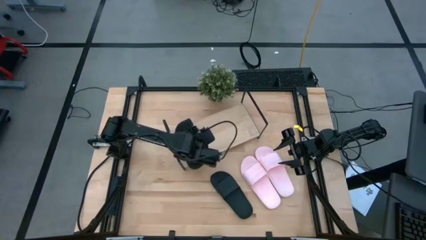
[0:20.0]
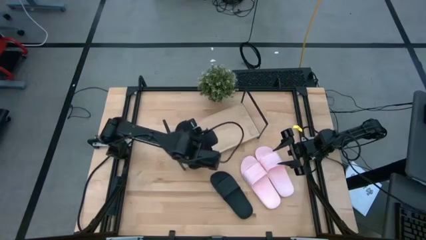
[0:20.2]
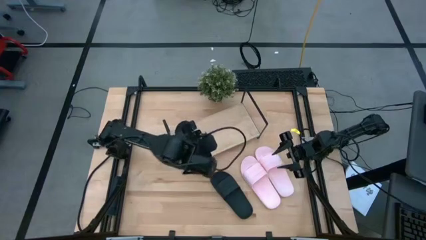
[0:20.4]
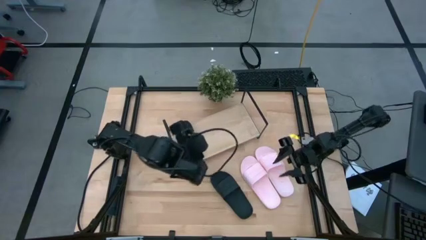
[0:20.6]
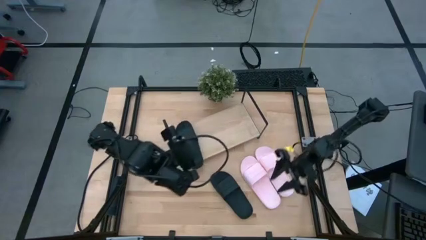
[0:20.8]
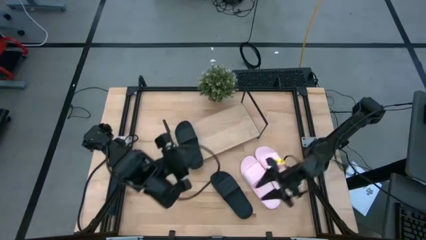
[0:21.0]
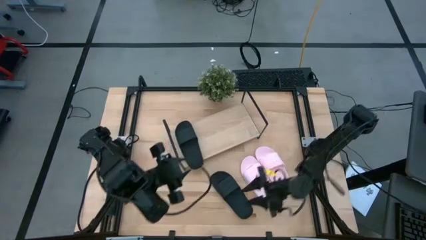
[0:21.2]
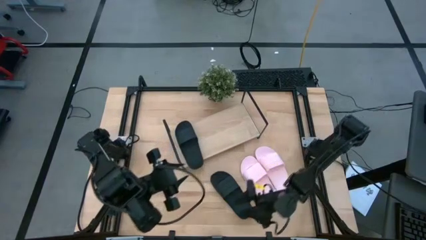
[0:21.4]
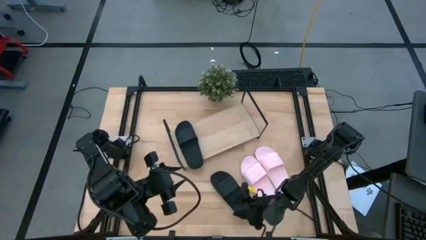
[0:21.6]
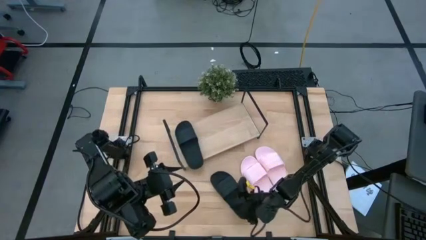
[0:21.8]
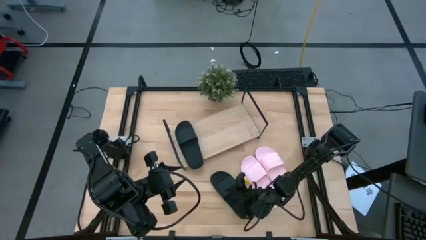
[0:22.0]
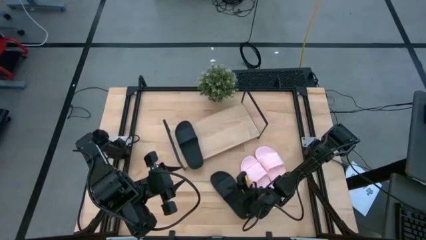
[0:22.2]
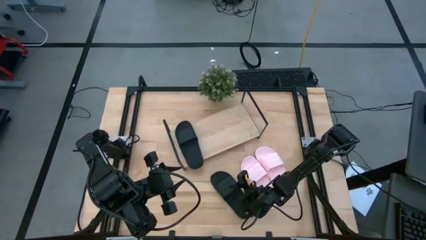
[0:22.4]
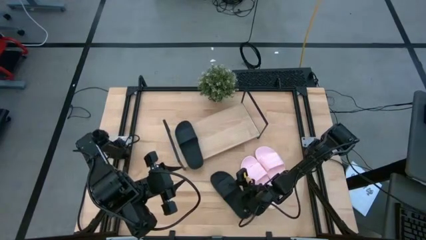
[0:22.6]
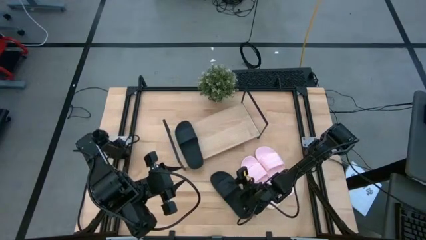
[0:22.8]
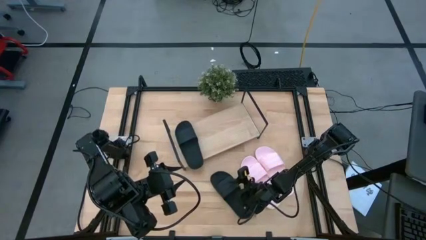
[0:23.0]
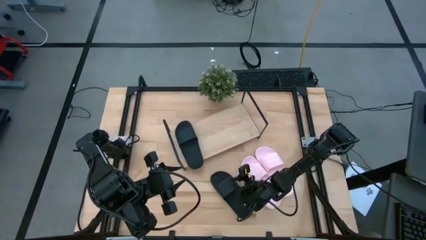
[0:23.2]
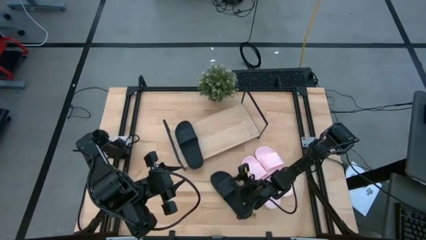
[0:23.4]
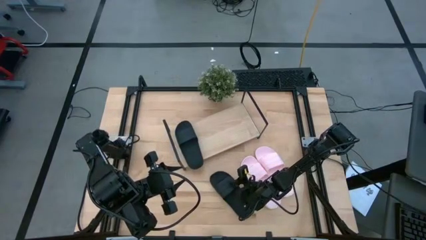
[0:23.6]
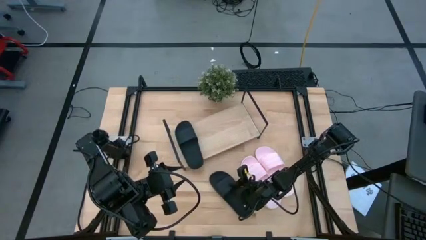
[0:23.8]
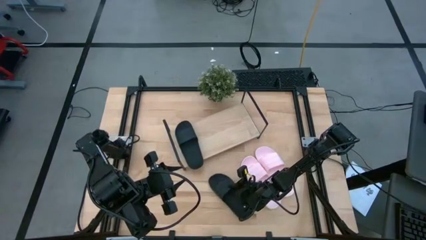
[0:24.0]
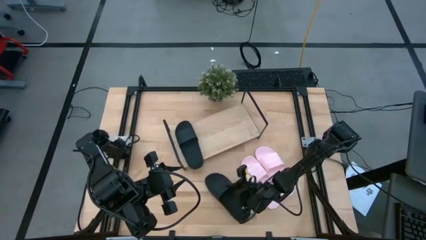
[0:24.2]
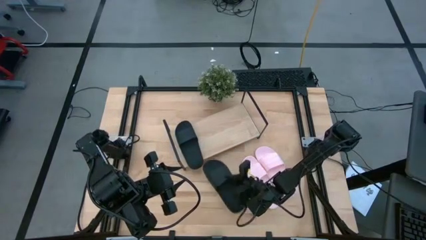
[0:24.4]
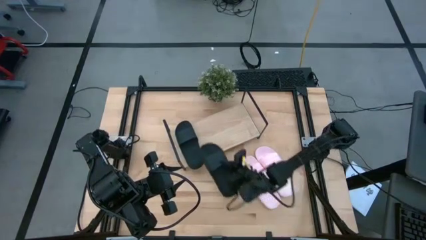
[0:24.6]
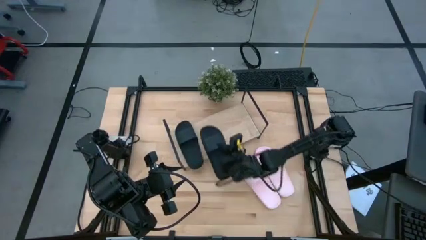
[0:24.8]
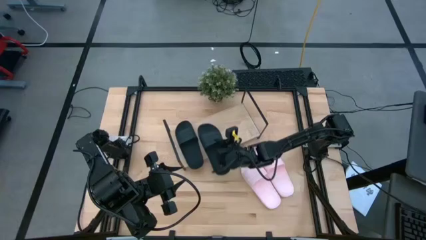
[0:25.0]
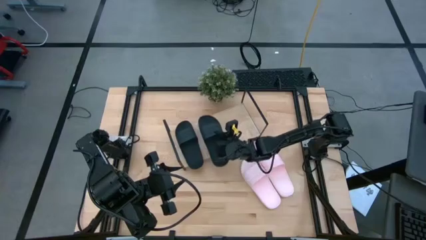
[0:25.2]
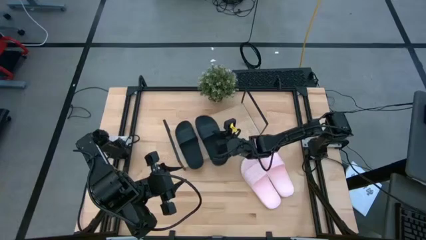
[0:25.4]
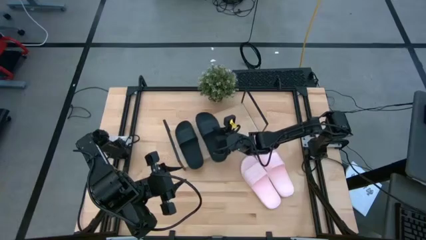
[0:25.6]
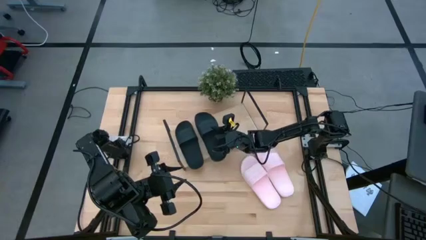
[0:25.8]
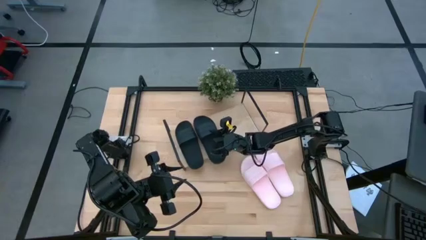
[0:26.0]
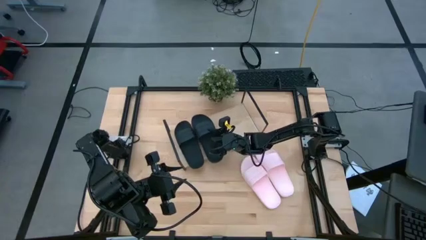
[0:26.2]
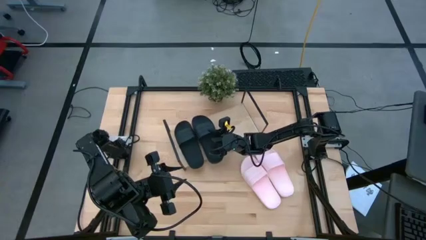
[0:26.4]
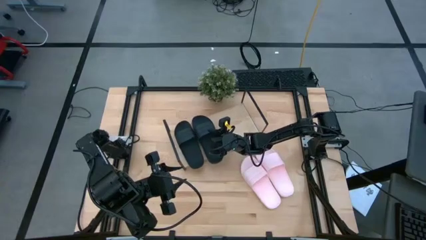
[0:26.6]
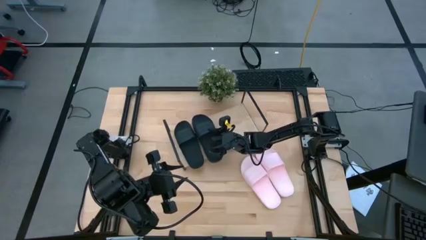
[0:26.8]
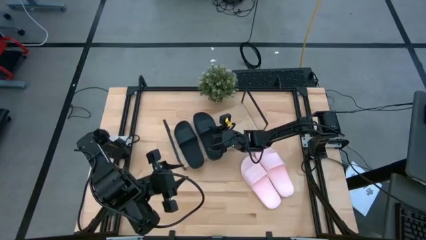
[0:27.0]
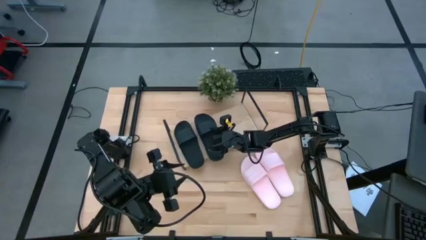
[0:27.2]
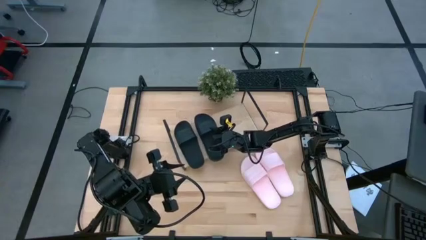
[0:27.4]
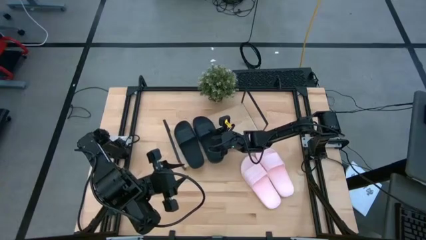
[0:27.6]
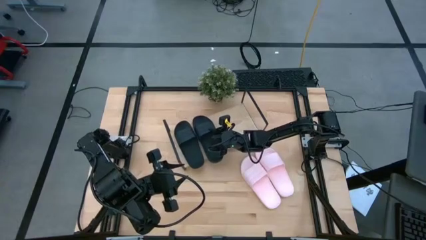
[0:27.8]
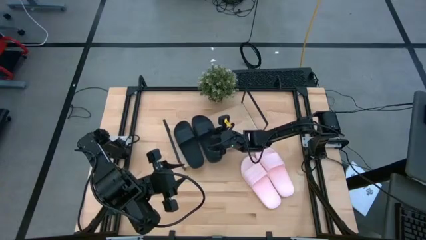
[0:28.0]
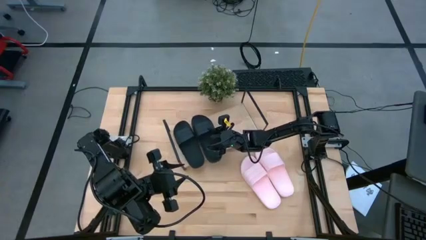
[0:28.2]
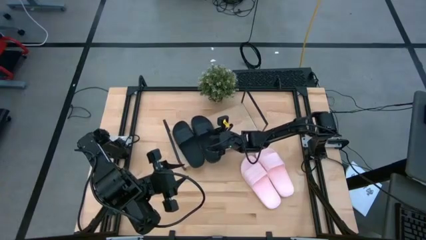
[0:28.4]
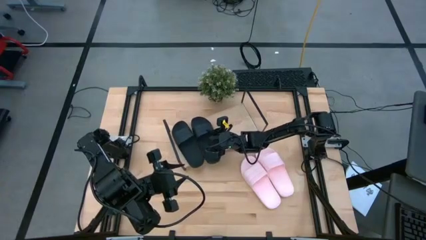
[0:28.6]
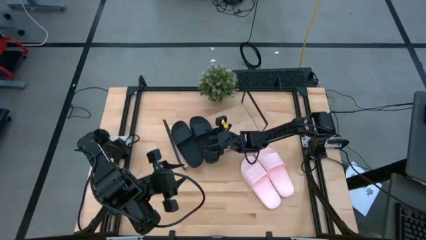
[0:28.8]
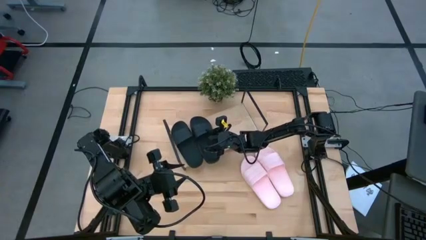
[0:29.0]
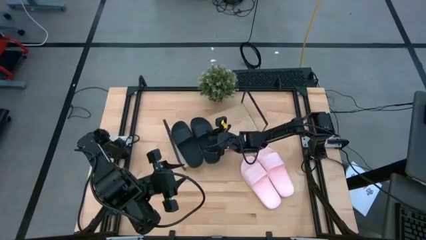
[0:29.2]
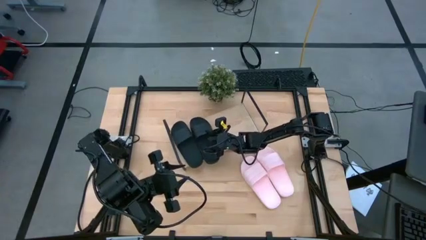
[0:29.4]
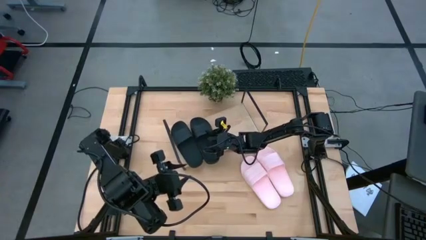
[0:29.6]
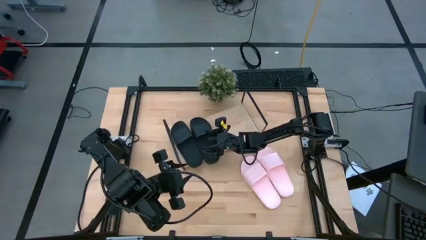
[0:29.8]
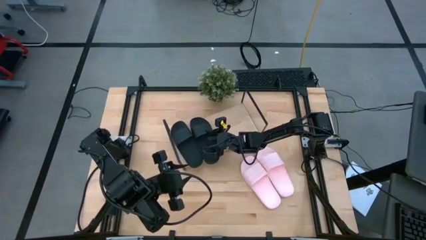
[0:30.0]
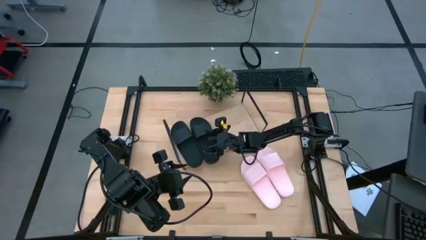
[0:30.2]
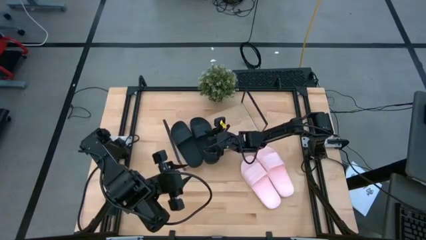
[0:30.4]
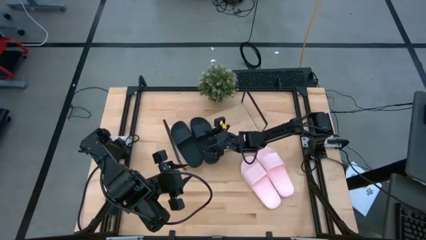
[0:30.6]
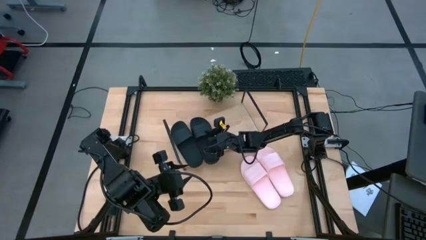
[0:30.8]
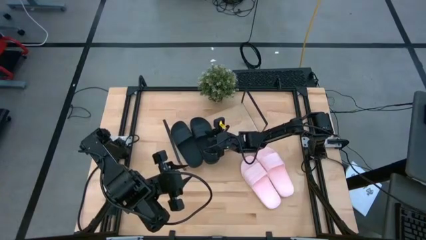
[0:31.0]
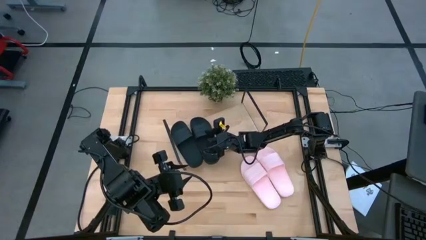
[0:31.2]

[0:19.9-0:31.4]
Task: Pick and place slides into the shelf
Put the right pair black slides on the shelf

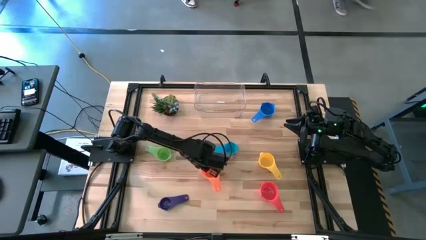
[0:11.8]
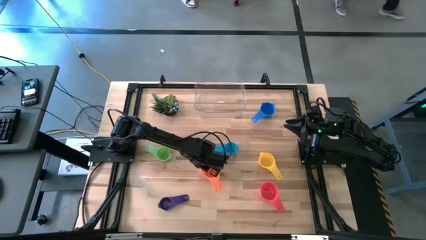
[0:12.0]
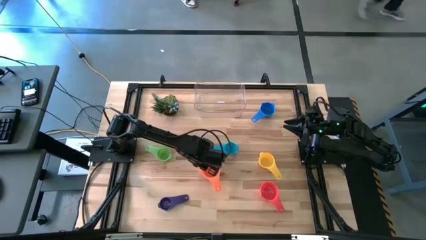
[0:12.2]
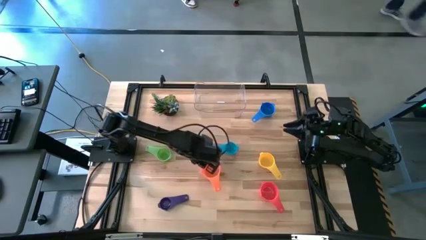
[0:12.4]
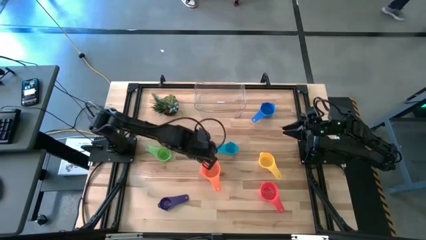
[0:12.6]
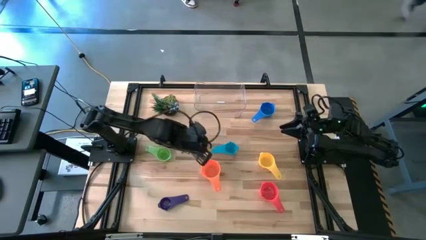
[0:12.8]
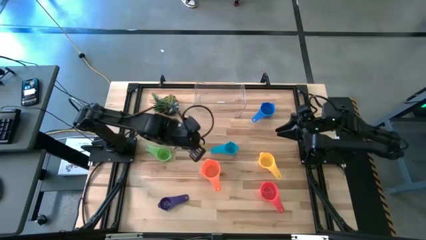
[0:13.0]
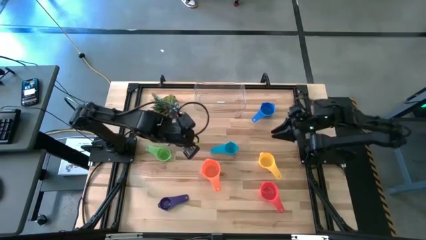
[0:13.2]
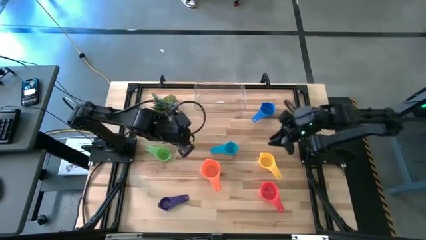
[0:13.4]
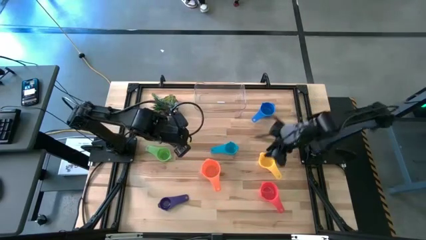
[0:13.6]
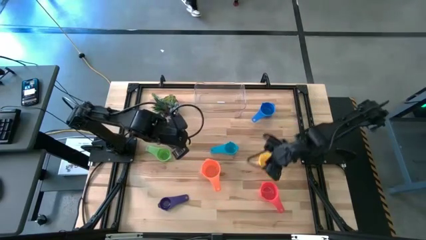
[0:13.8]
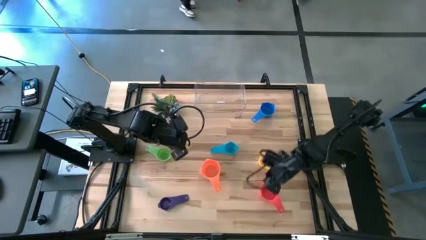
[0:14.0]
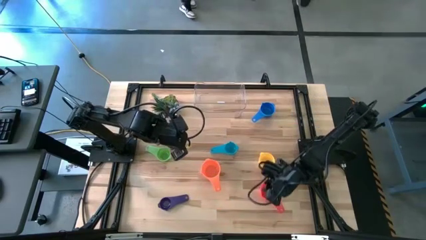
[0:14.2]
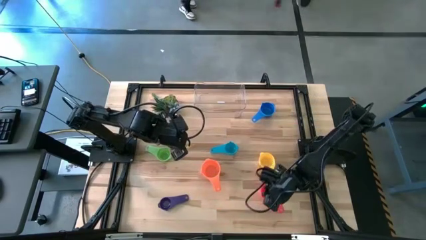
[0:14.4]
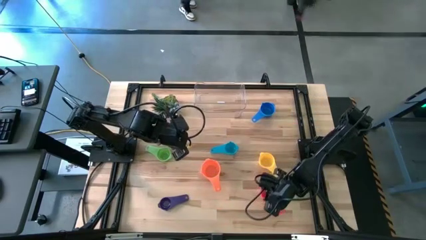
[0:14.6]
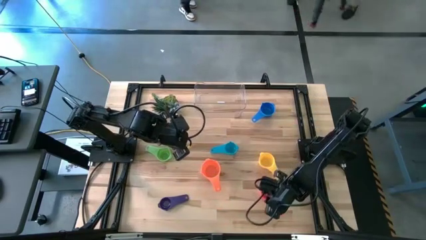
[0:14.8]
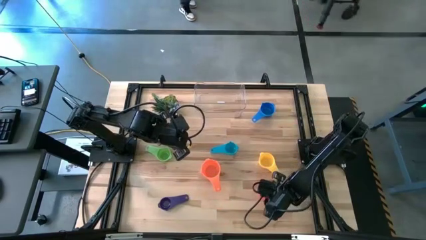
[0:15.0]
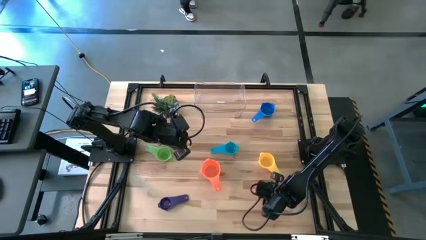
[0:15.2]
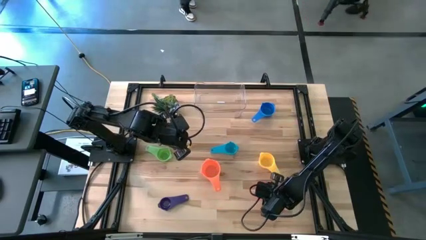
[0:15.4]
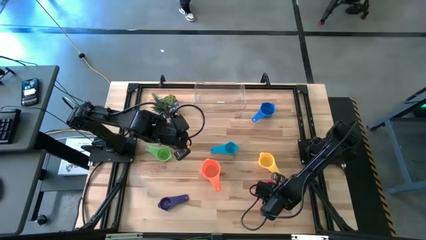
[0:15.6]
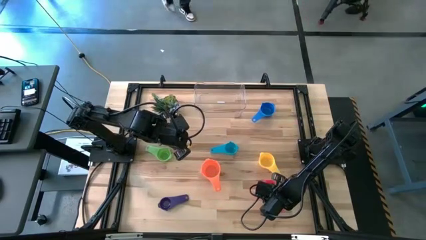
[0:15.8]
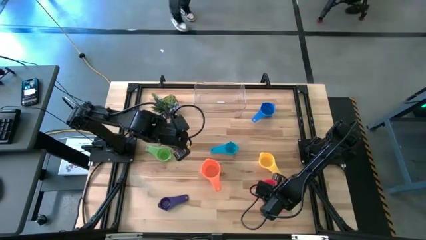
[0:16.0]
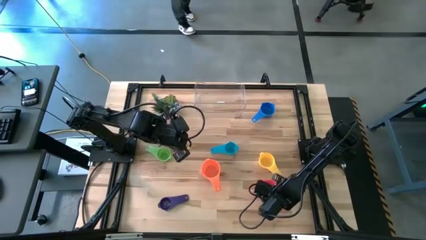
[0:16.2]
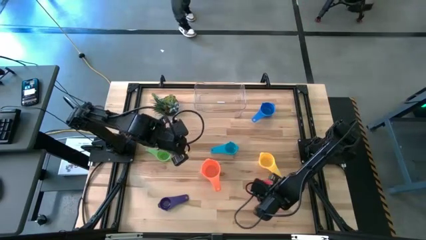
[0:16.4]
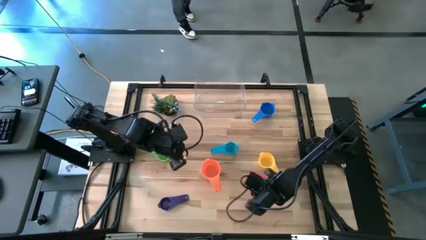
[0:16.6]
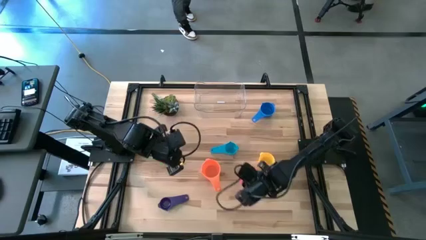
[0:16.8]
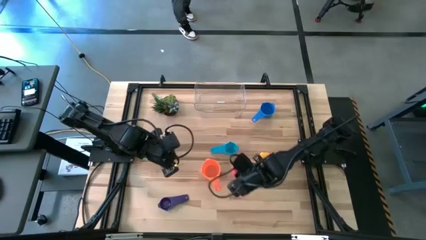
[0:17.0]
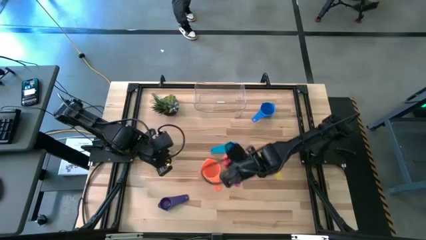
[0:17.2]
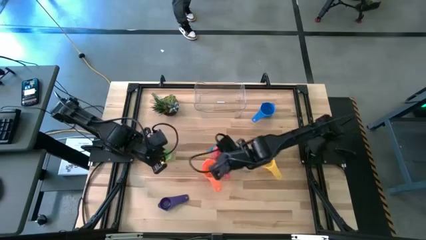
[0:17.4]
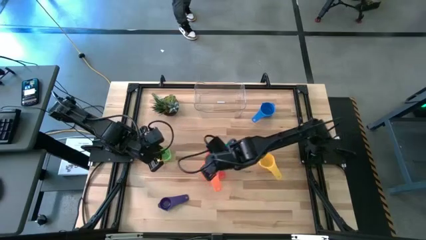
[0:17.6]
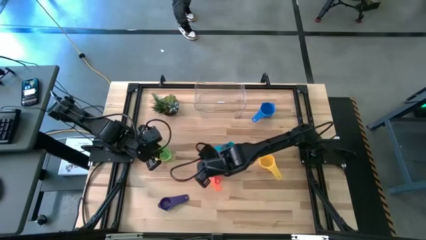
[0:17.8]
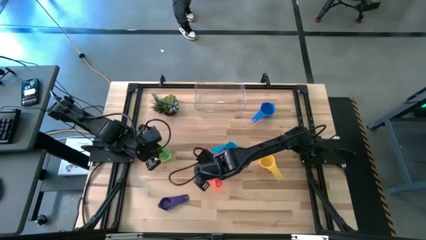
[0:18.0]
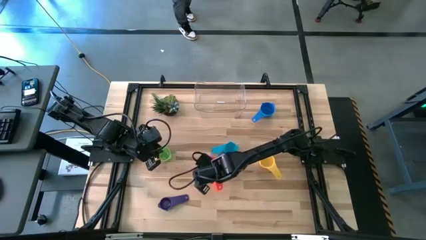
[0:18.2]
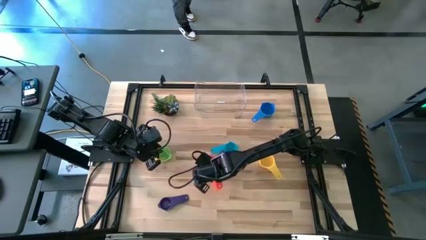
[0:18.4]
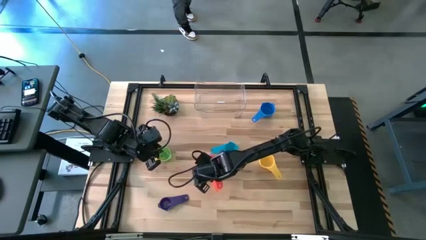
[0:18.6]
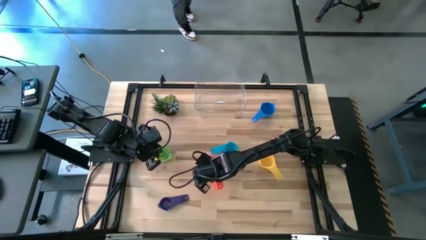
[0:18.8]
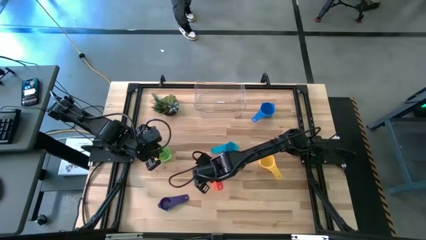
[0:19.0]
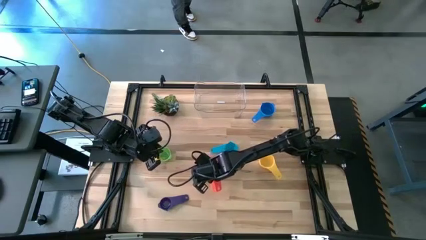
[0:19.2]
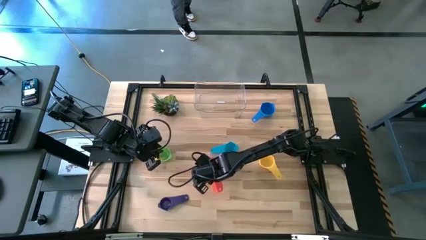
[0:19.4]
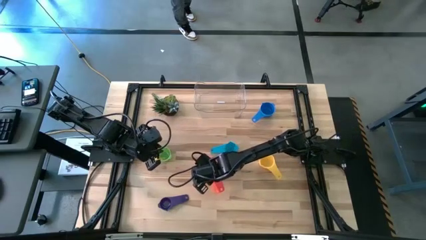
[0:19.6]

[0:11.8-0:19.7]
Task: Nest measuring cups in basket
Stack the red measuring cup on top of the orange measuring cup
